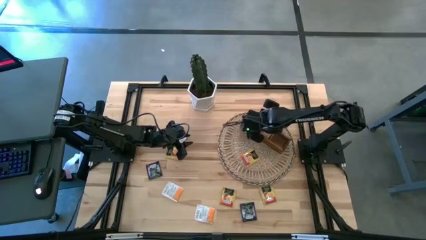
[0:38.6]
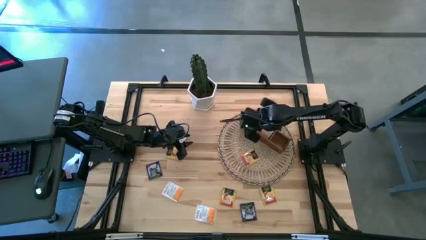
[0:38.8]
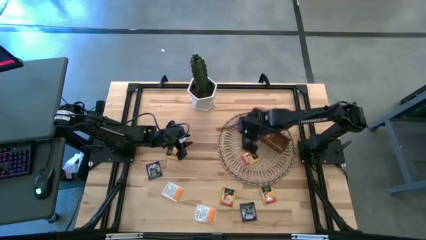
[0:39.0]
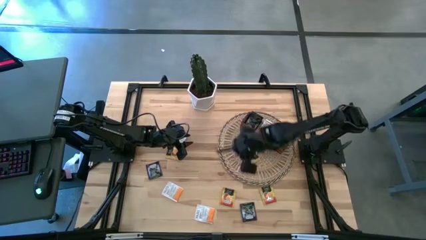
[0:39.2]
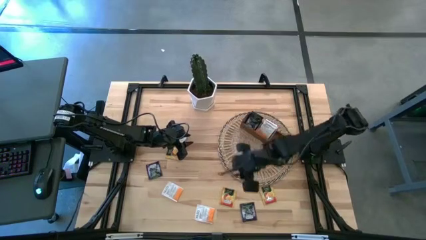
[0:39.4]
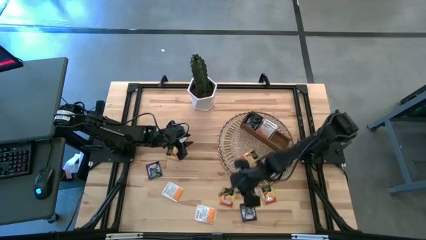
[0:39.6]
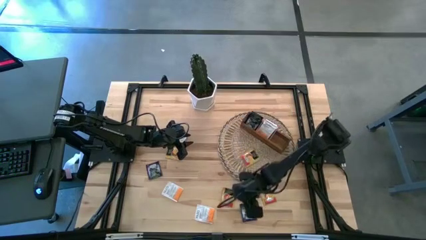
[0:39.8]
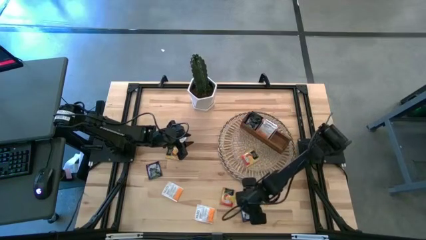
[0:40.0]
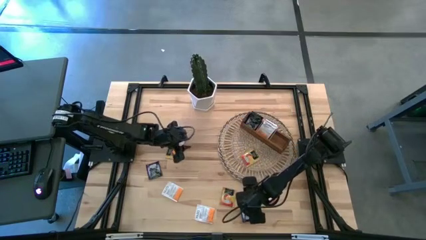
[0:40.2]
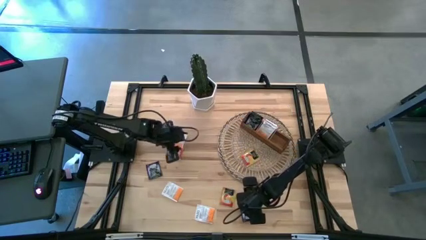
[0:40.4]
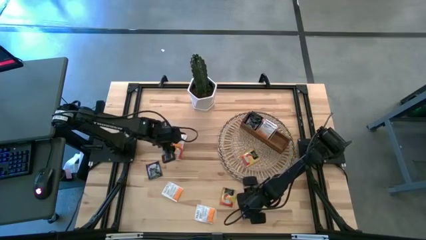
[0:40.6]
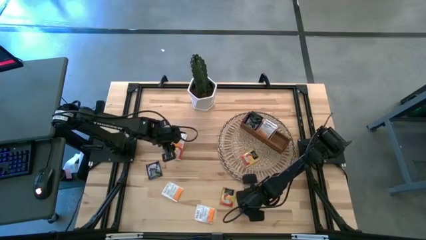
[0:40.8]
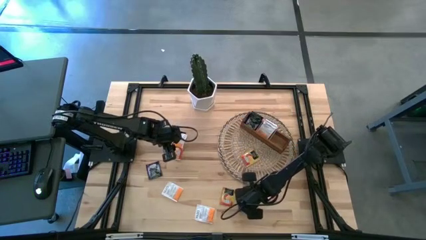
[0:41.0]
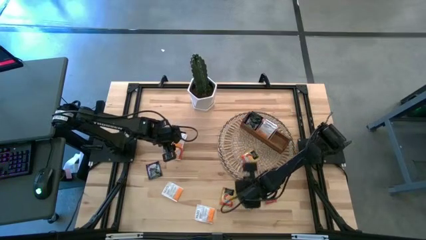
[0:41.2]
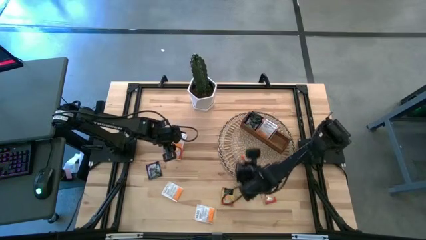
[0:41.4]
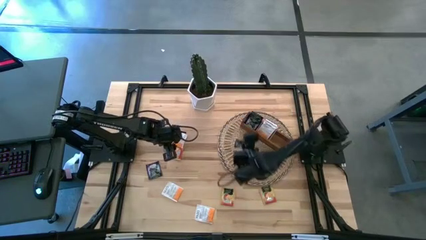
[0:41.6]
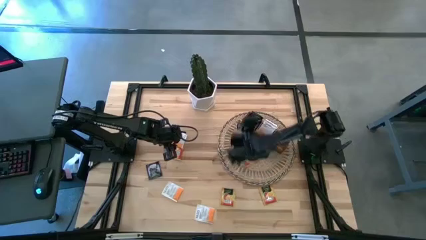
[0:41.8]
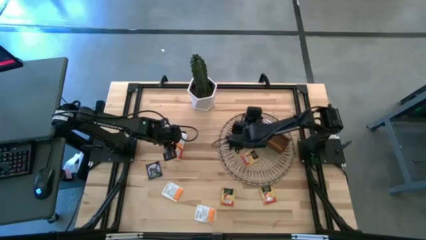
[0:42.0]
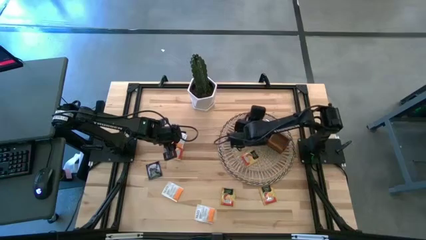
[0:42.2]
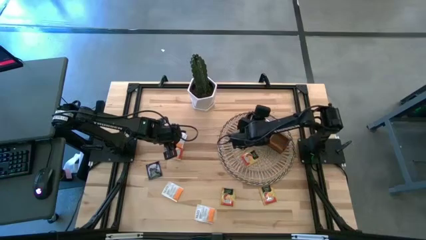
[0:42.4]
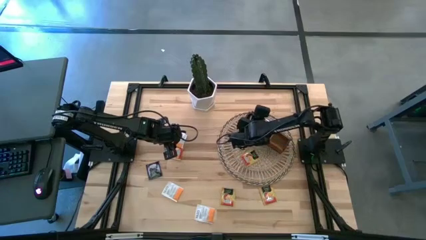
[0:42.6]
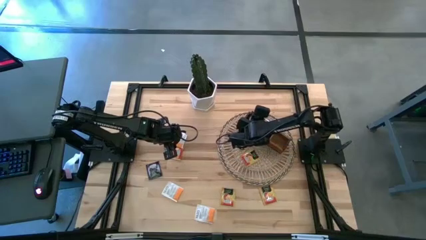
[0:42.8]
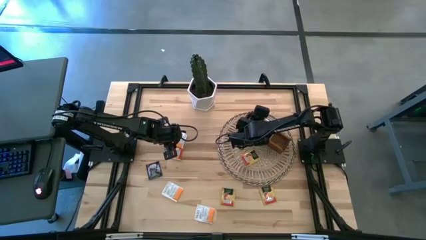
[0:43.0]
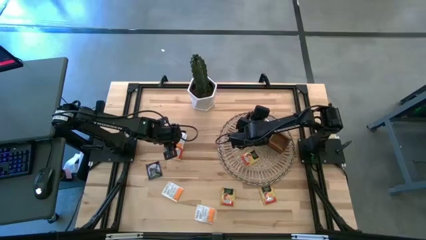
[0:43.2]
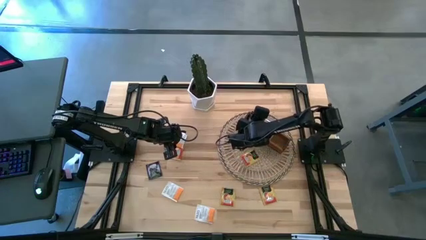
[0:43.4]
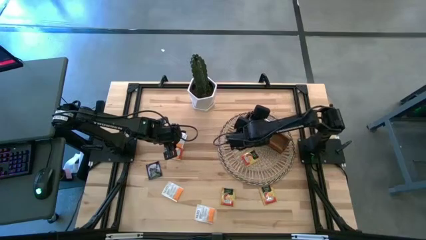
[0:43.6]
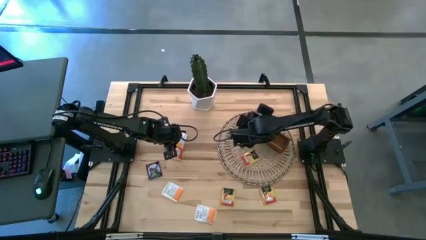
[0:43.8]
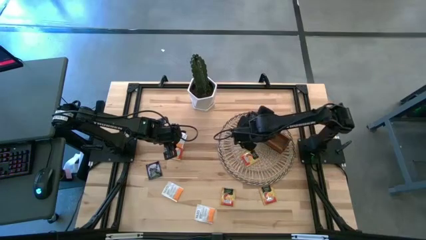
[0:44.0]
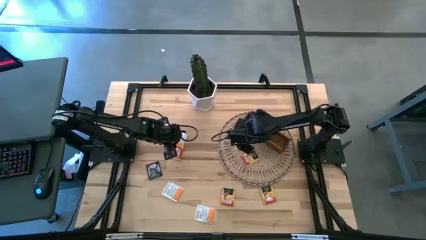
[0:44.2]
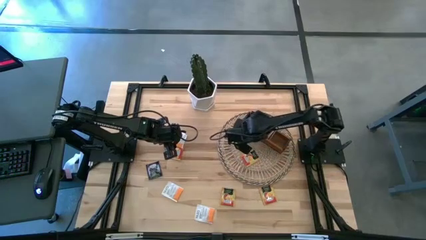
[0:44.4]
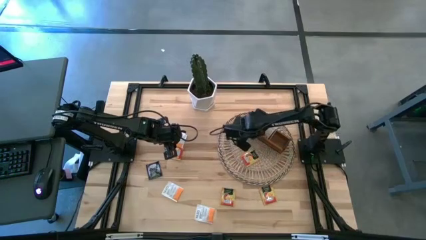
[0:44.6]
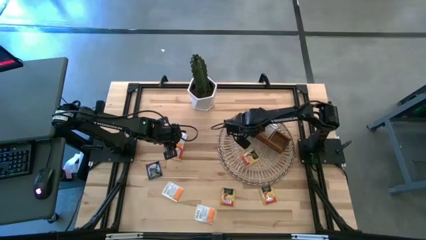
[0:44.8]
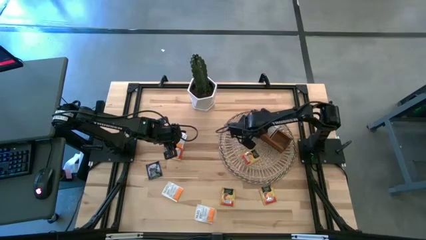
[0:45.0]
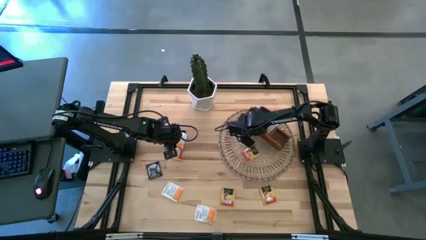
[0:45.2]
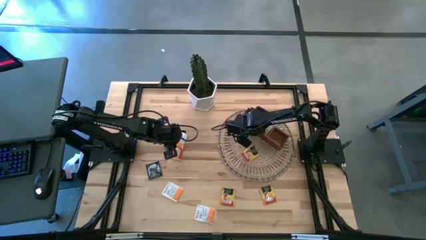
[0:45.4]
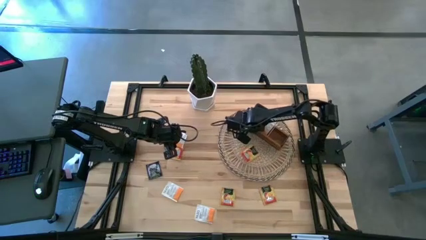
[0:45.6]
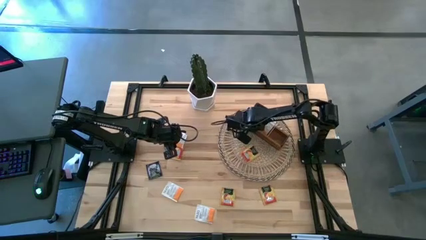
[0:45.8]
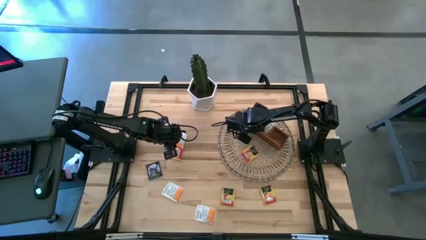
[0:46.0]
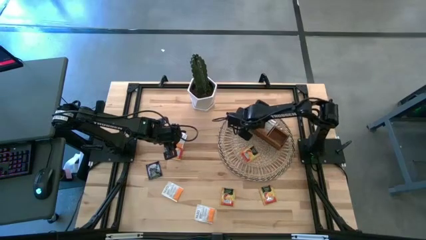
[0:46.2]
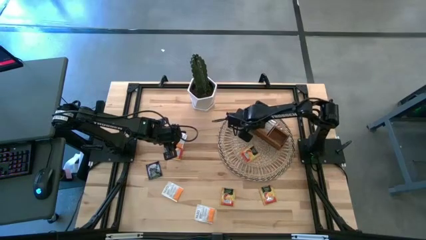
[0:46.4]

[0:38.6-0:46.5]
Task: Pick & Place Tea
Put the purple tea bag into the left section of the wooden organizer

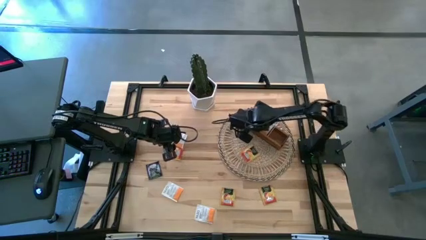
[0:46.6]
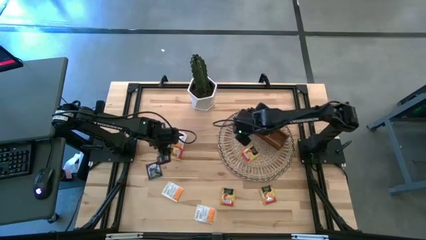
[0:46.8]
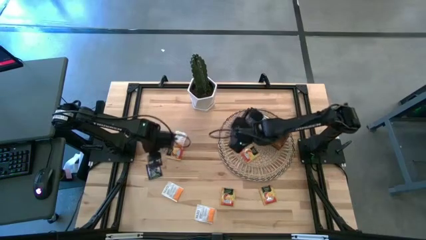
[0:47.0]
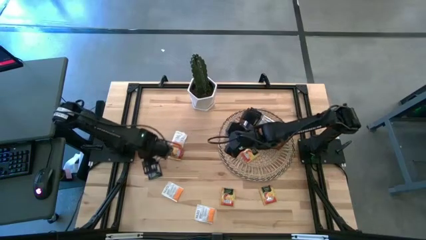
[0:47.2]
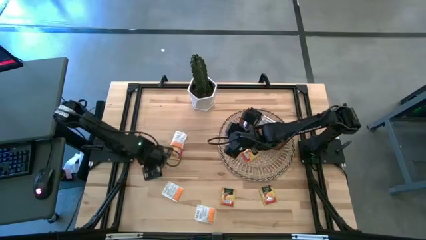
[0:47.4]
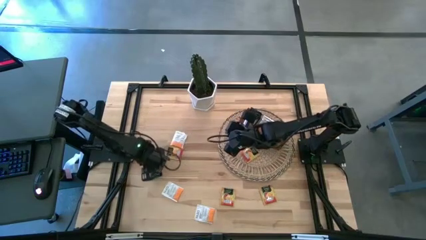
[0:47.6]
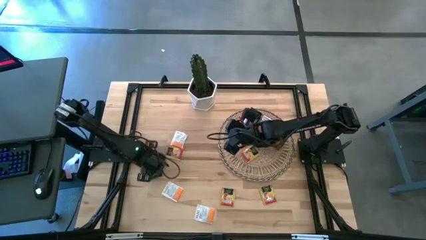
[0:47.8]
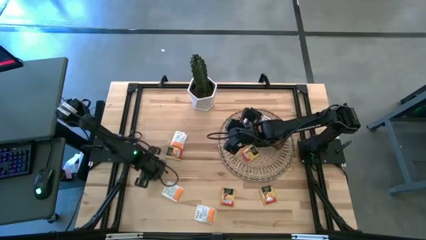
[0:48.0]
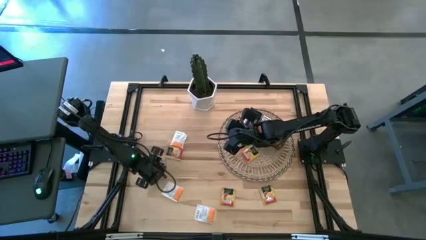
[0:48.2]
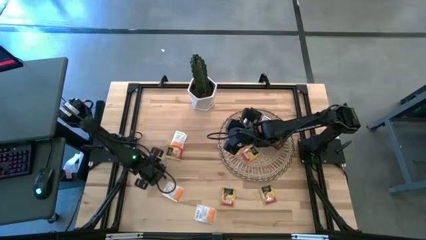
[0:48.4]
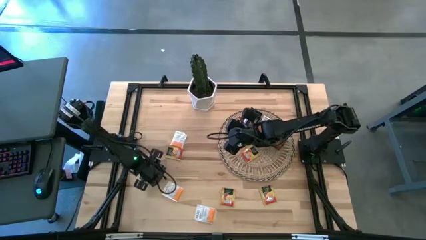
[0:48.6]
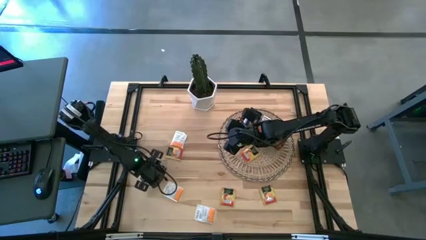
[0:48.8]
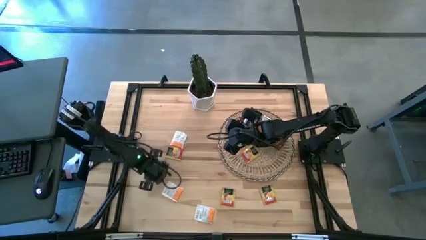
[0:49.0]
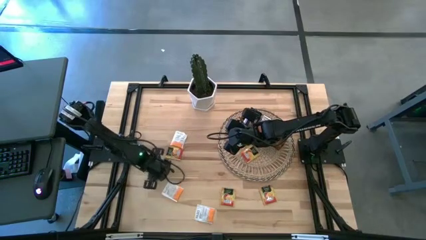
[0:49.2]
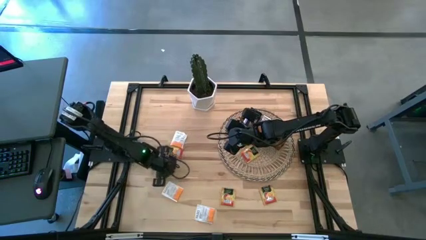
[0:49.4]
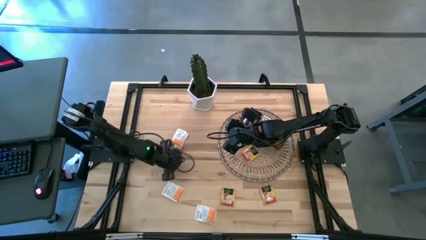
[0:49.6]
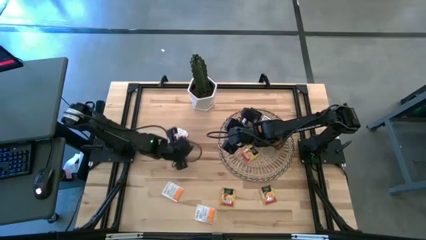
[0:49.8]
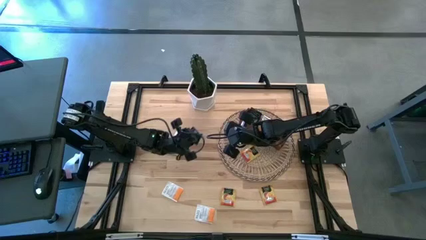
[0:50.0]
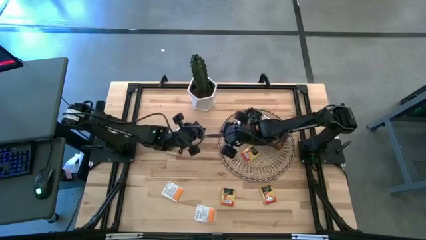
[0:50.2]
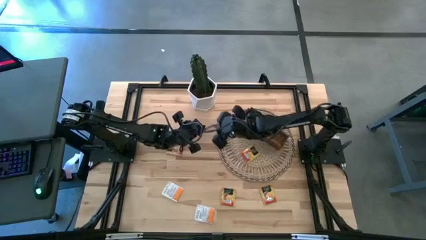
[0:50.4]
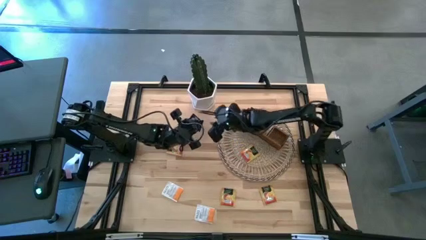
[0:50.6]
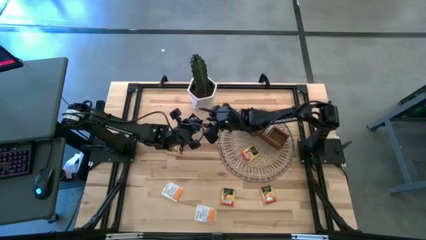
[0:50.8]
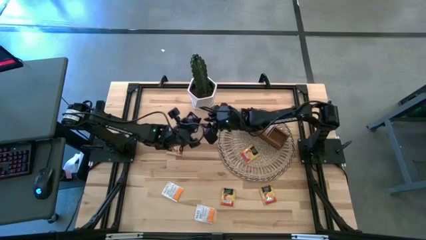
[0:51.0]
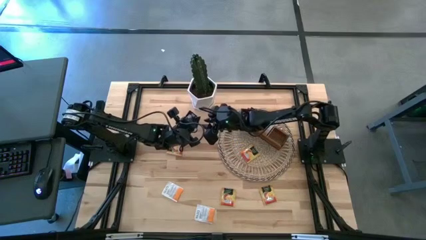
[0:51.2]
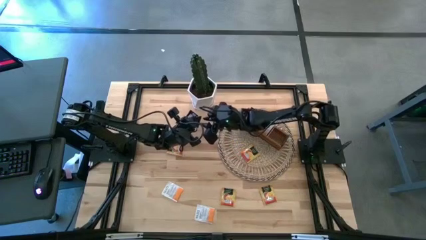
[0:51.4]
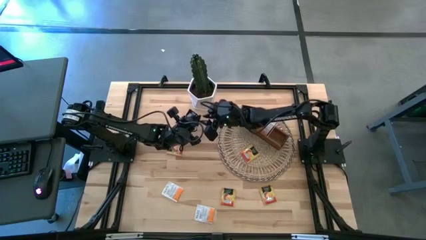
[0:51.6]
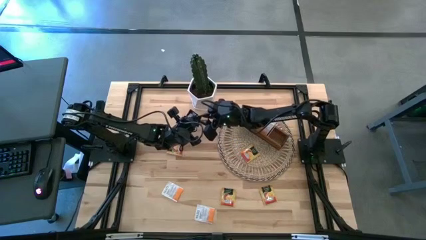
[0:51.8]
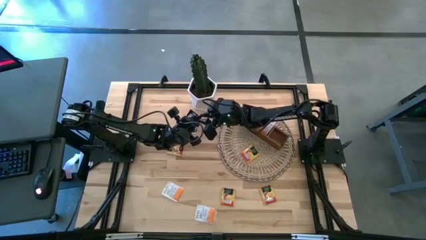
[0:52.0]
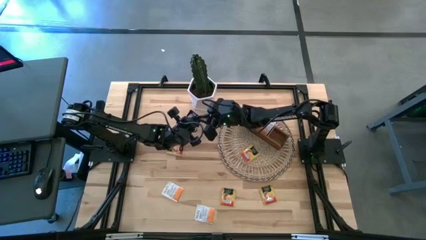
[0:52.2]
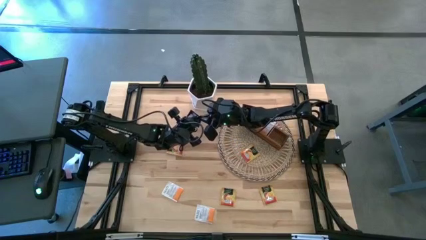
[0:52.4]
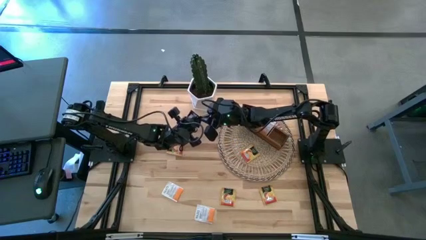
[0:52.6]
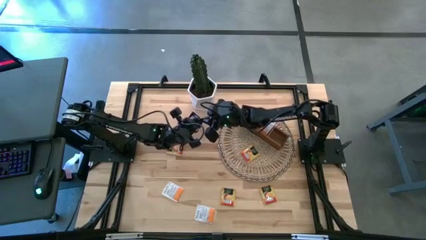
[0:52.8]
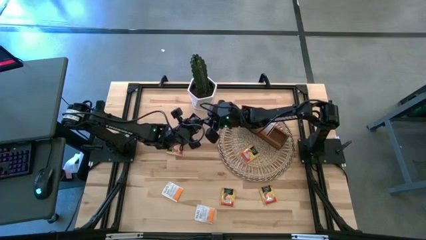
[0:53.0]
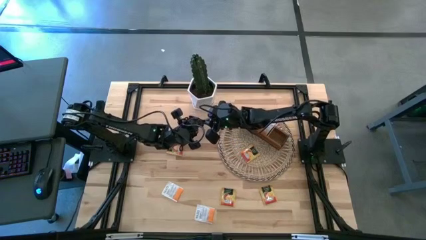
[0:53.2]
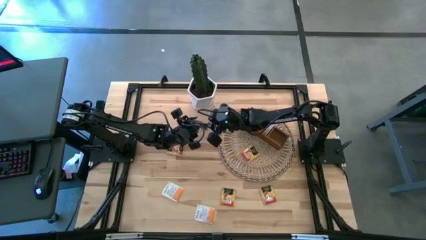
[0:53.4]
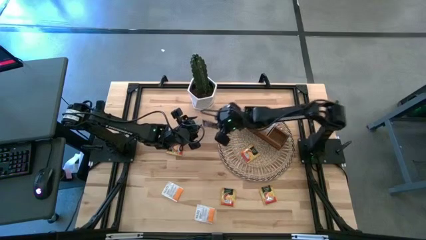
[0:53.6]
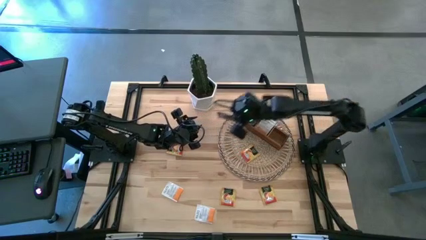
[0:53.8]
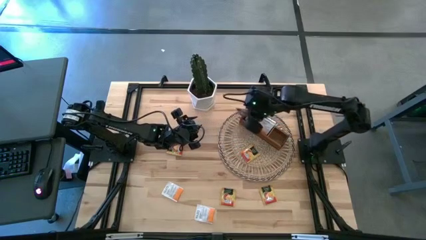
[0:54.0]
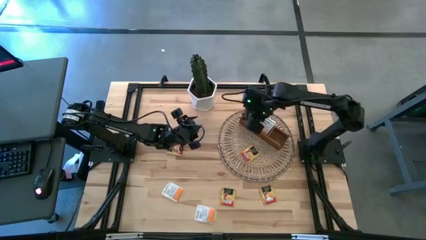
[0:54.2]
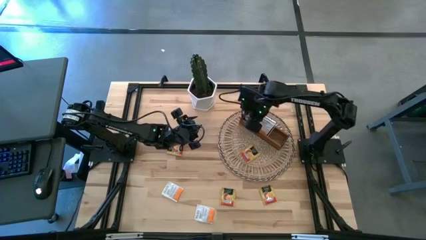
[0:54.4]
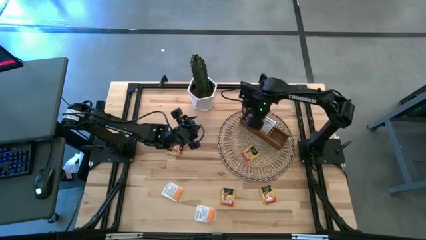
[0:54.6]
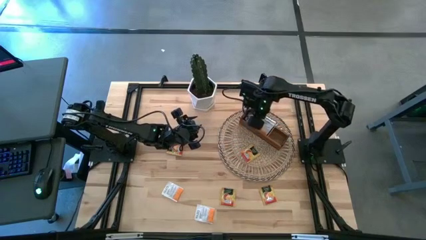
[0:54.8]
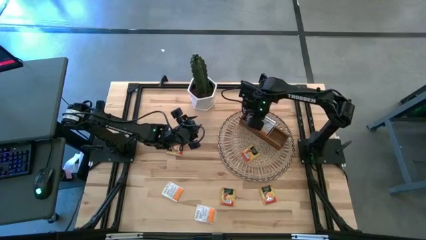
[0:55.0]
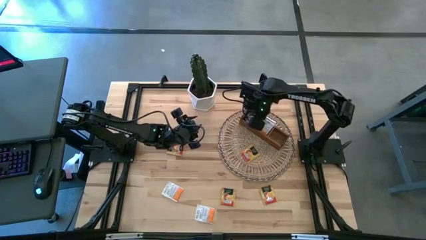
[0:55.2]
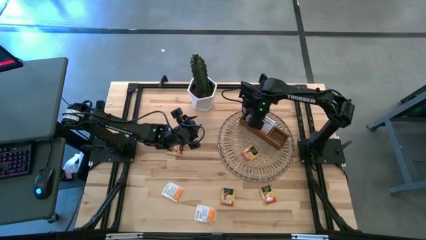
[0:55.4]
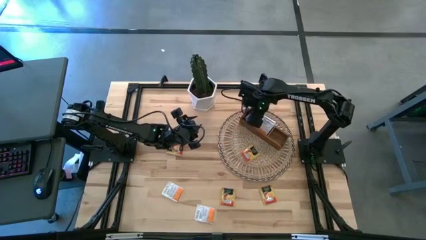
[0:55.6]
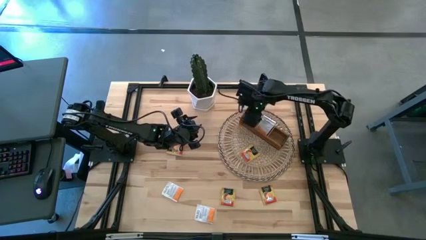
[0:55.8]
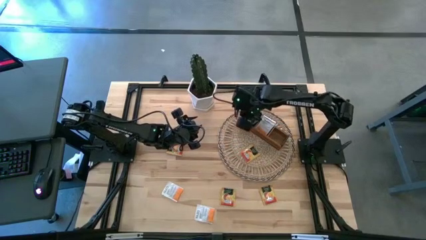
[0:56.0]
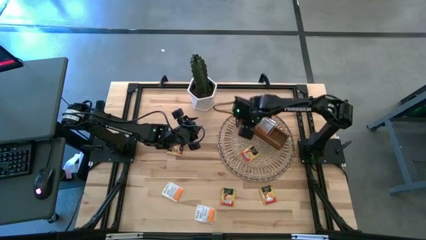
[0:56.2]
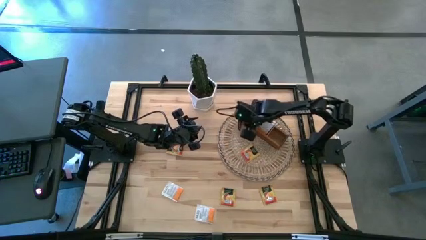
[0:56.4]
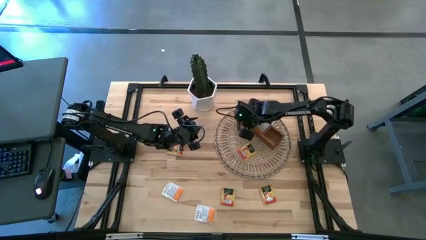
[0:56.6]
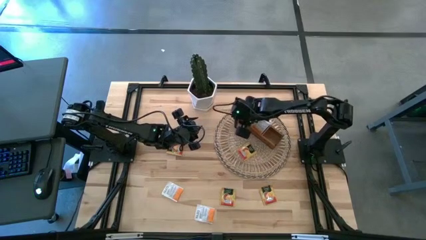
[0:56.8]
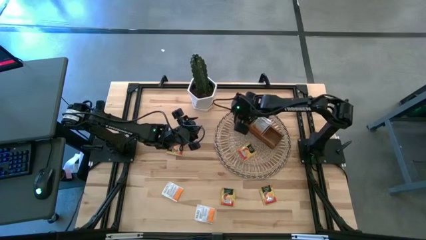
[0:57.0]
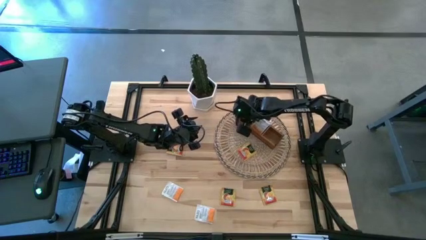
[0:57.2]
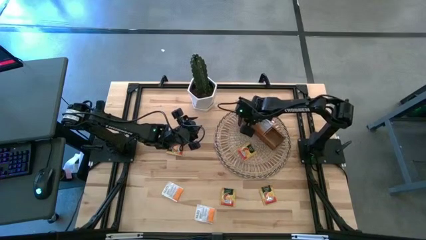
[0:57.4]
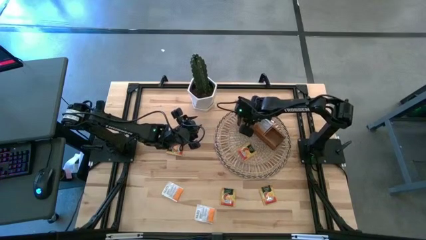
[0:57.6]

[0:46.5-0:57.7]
Put the purple tea bag into the left section of the wooden organizer
